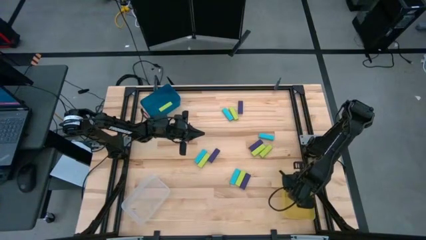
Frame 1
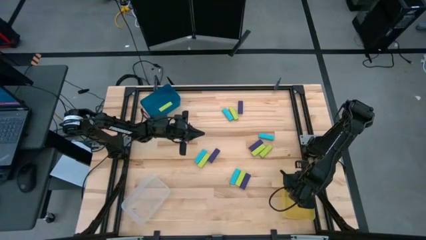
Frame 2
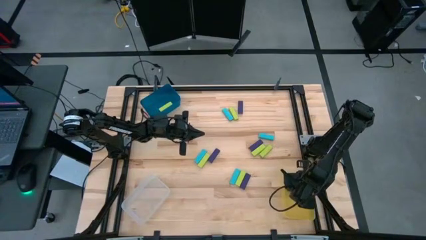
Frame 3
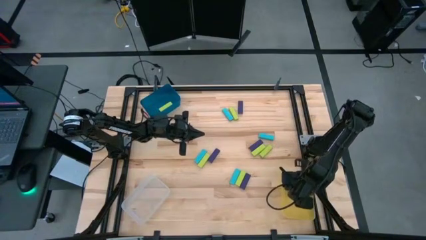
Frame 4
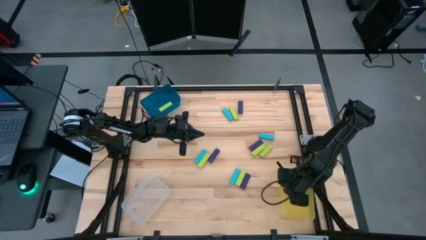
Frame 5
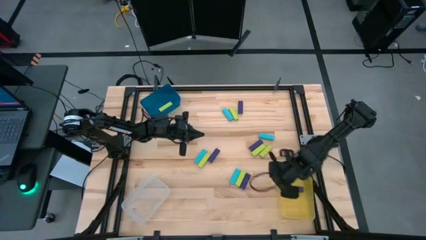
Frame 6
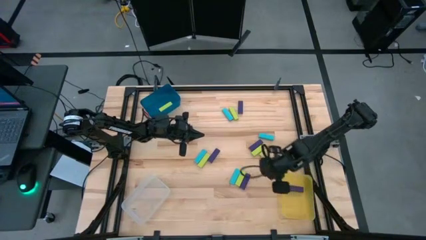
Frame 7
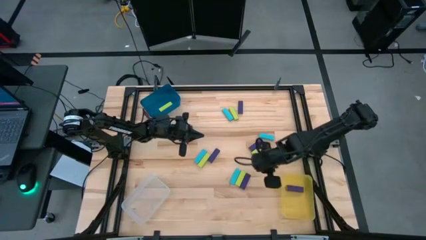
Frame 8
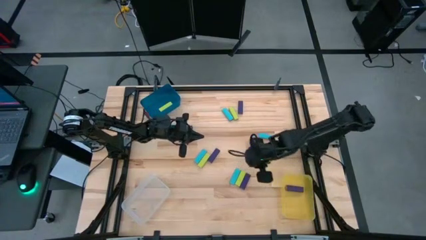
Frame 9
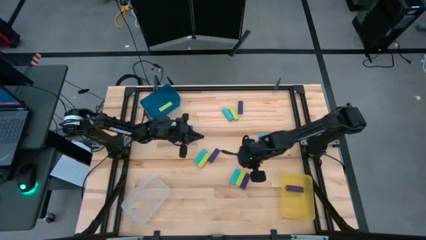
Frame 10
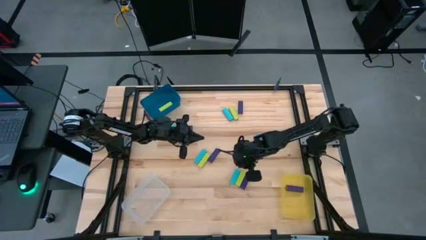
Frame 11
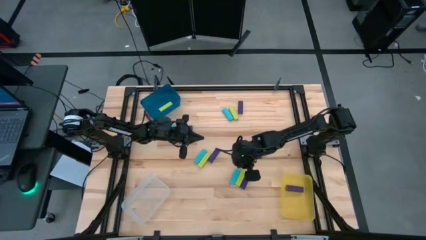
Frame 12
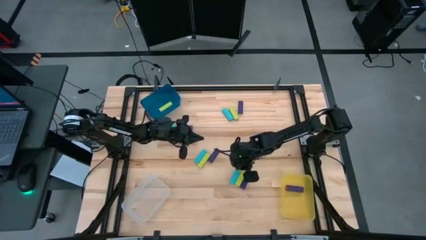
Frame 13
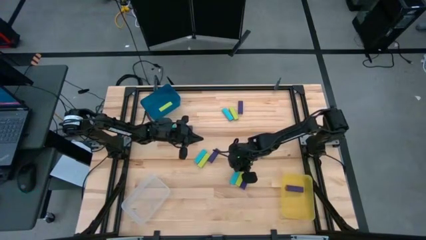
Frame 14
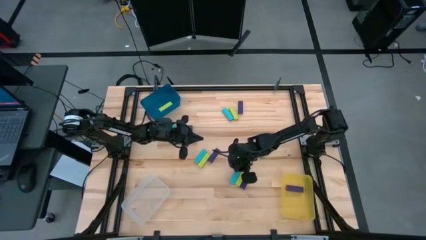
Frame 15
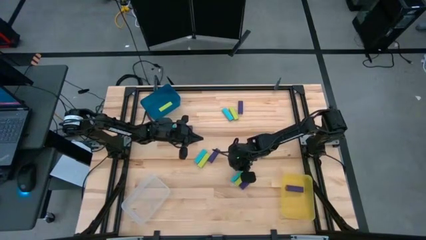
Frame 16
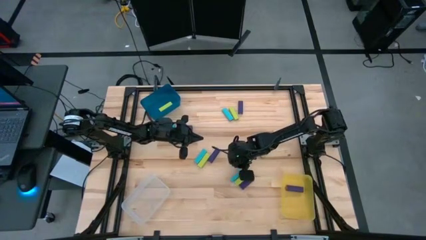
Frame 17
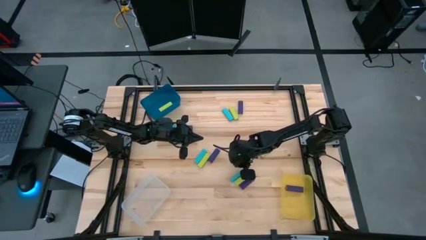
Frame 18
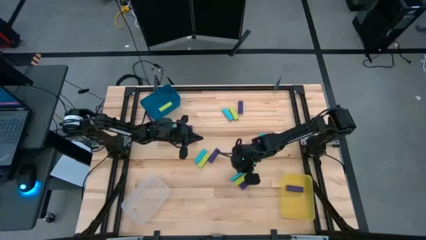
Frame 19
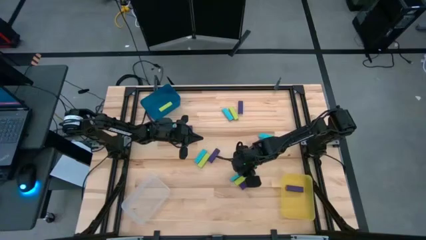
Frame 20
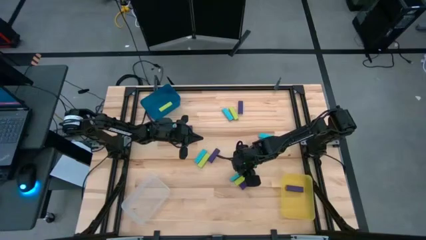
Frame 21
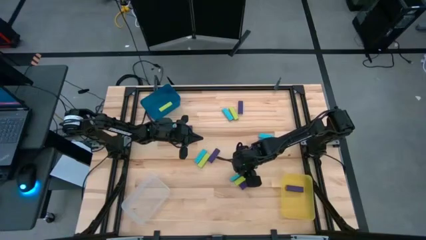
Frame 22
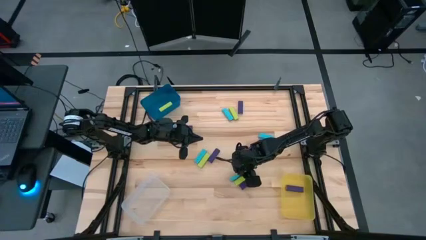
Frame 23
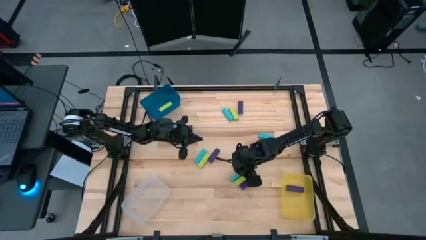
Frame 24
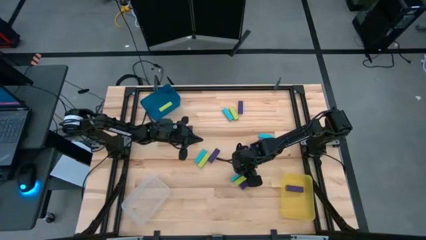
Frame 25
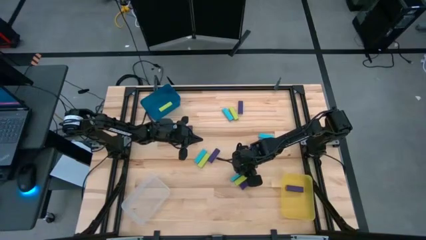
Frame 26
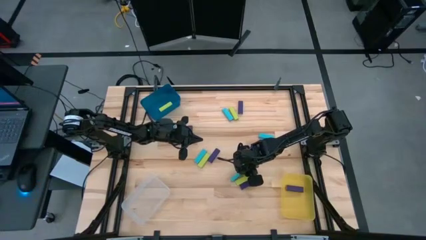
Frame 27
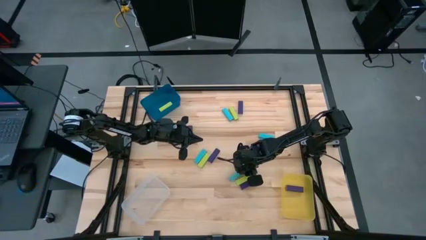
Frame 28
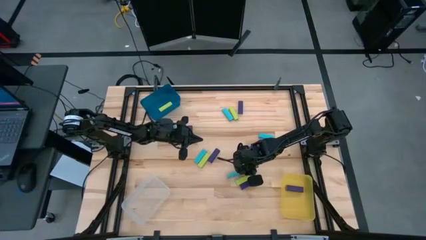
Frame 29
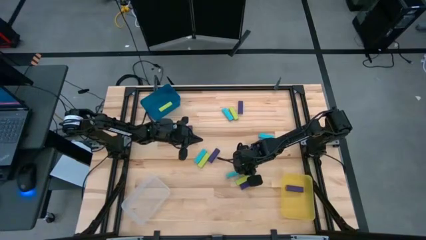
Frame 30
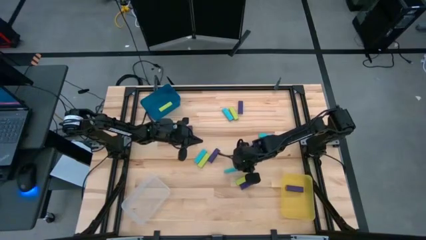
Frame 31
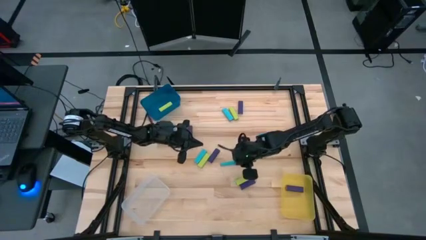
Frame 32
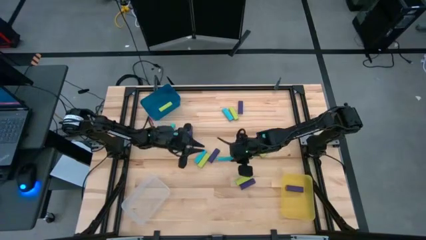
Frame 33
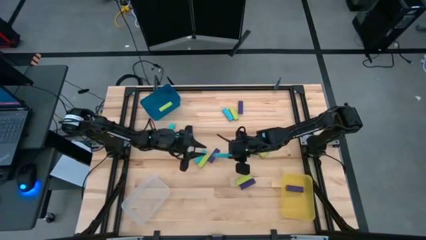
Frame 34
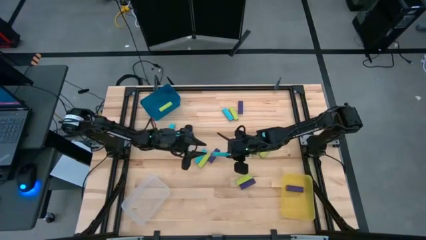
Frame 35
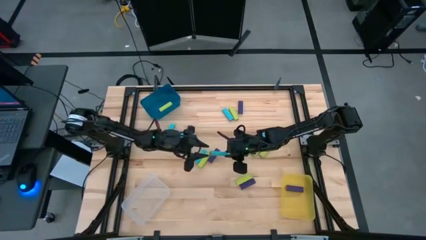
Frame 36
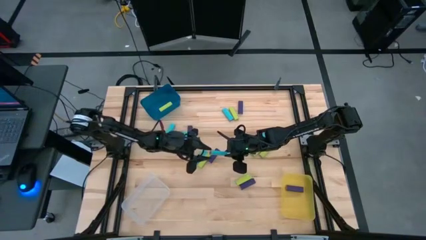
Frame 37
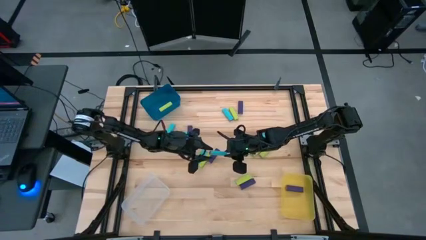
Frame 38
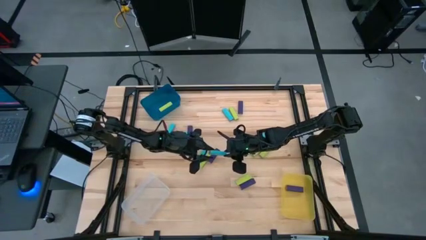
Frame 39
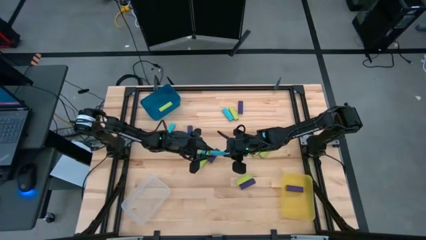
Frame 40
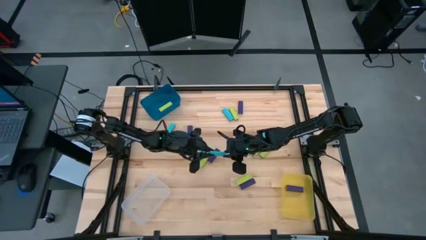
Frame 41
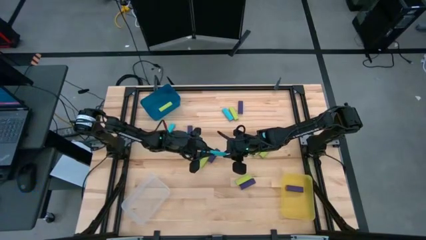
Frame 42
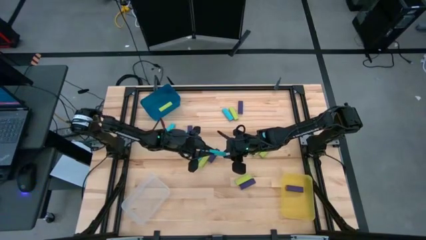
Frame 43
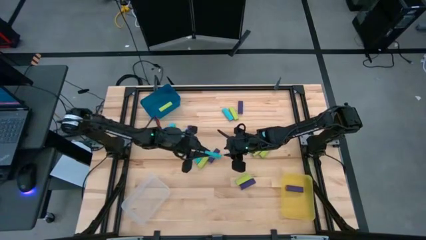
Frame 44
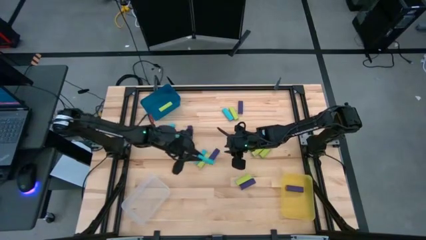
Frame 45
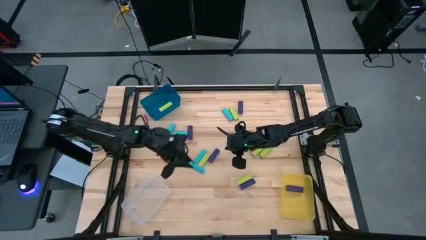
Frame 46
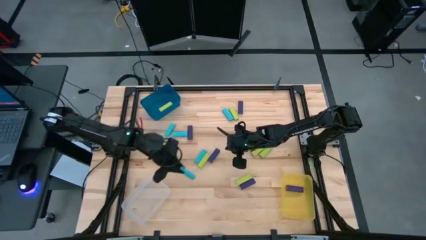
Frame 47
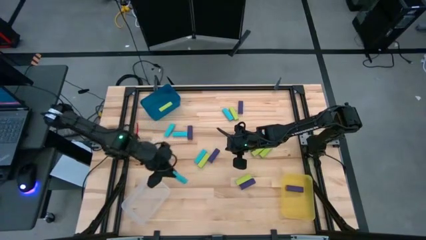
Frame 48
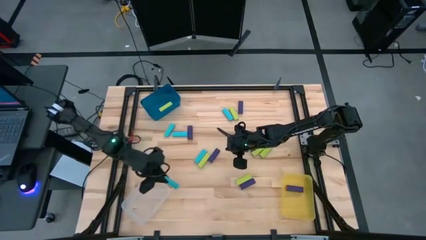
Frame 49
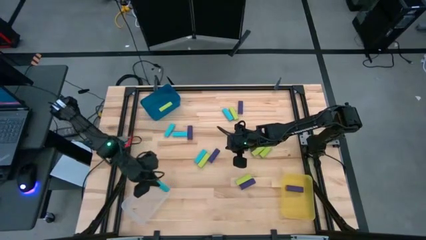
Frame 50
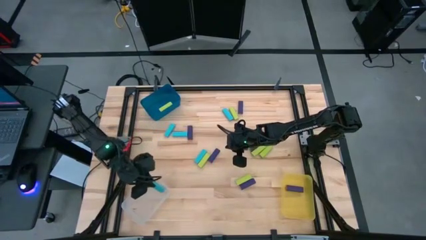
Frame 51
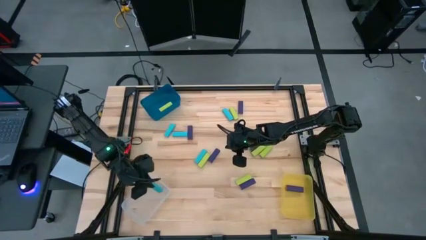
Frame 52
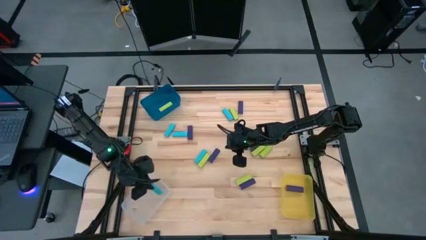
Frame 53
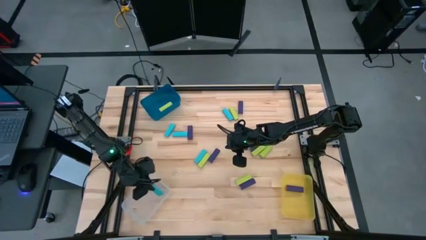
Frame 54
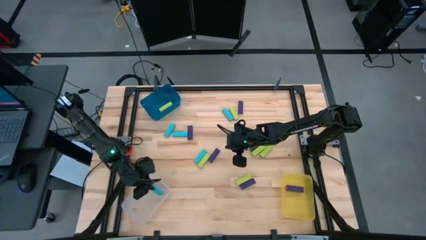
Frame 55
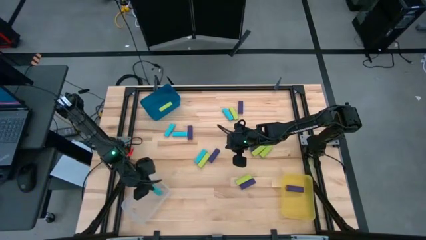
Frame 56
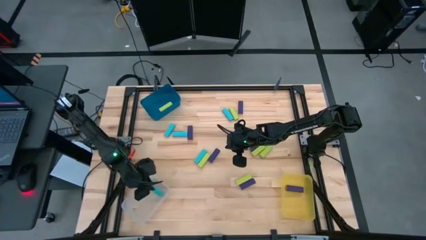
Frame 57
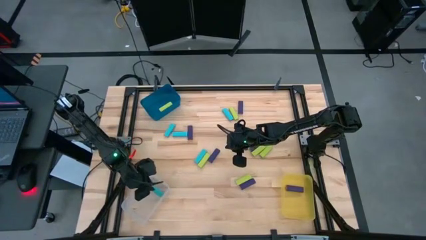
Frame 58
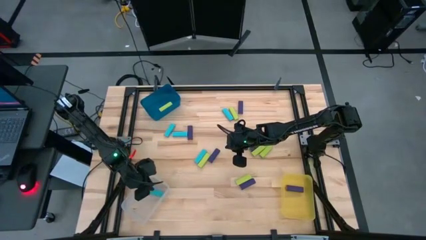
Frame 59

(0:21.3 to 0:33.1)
Task: Sort blocks
Put the blue block into the transparent bin

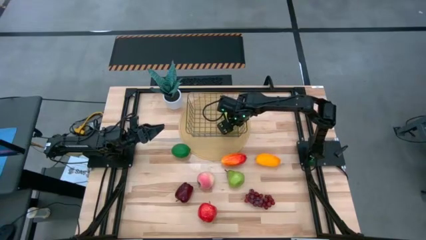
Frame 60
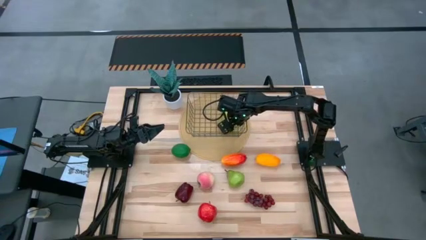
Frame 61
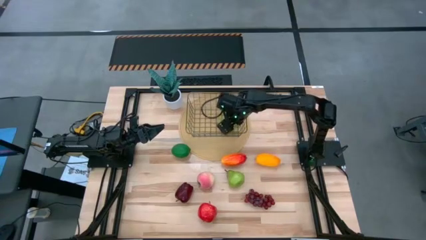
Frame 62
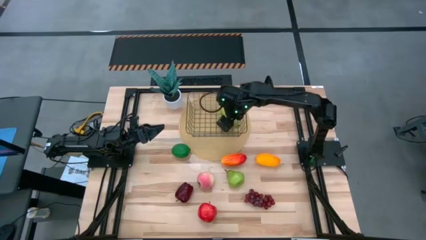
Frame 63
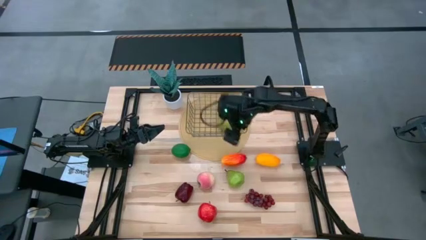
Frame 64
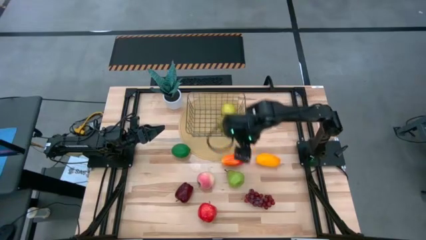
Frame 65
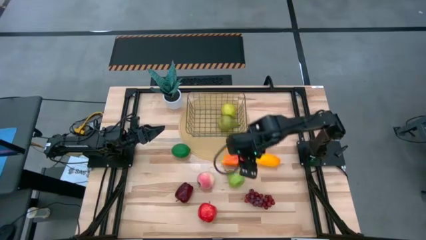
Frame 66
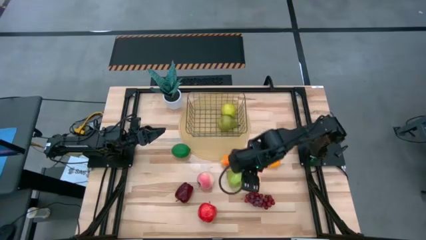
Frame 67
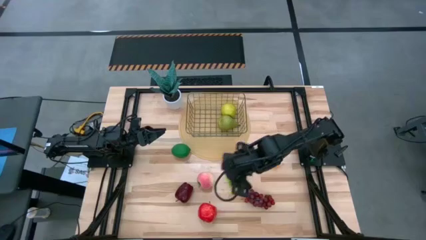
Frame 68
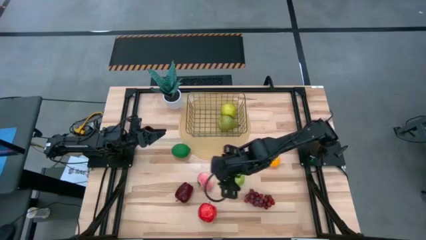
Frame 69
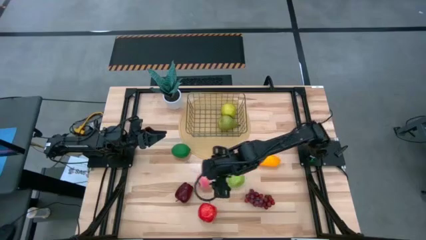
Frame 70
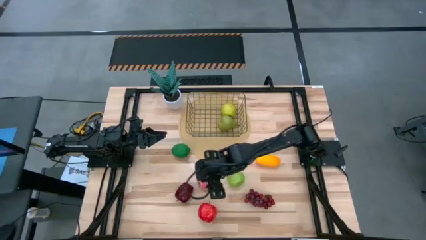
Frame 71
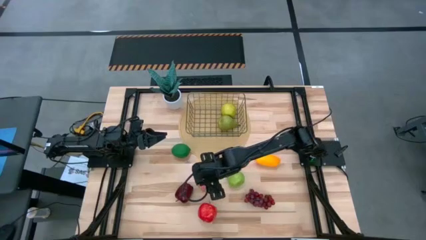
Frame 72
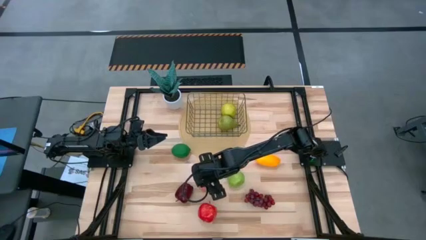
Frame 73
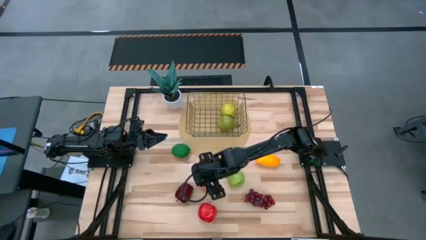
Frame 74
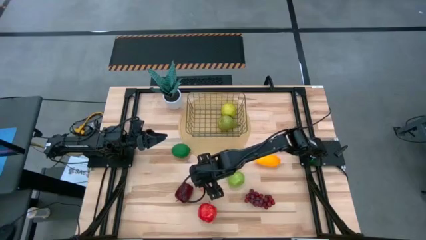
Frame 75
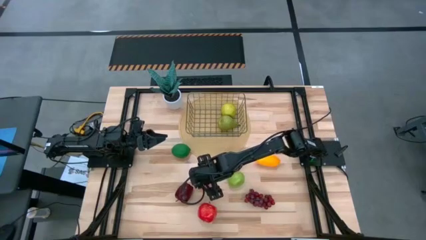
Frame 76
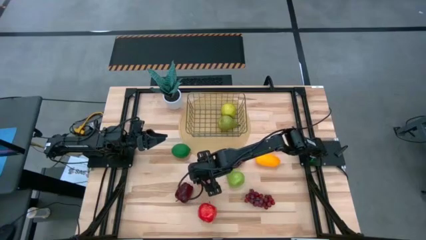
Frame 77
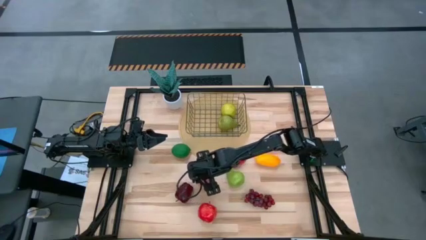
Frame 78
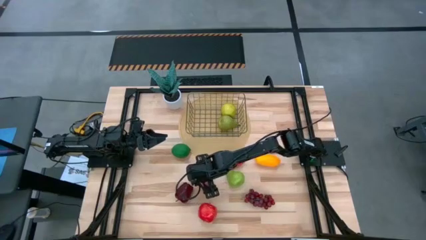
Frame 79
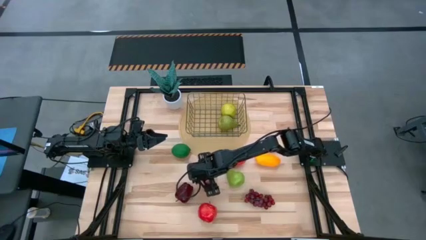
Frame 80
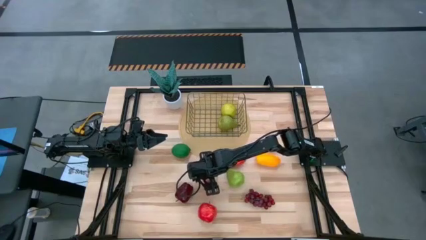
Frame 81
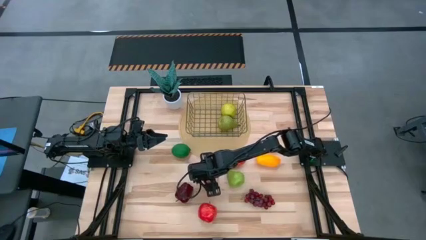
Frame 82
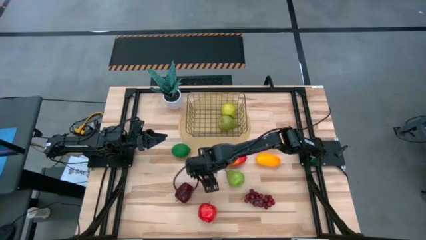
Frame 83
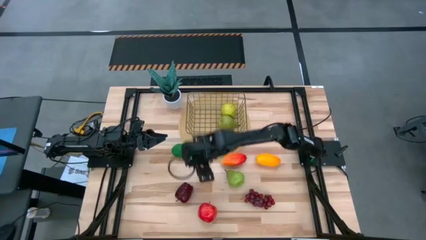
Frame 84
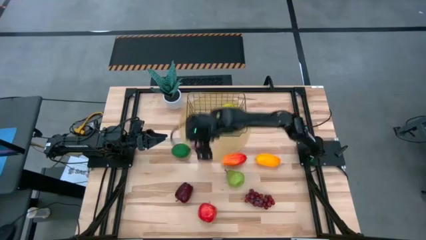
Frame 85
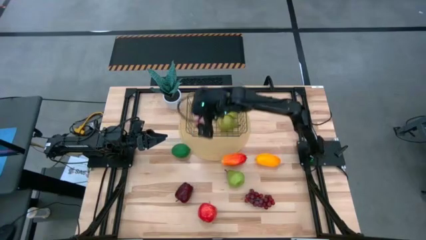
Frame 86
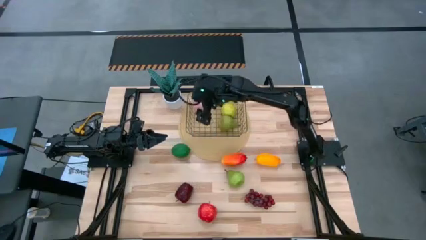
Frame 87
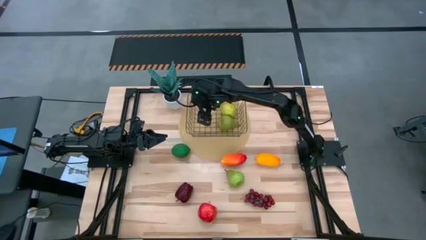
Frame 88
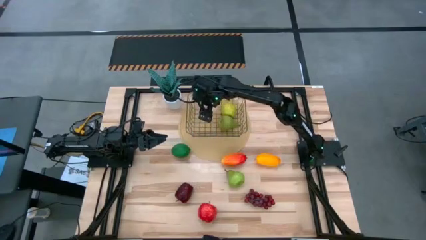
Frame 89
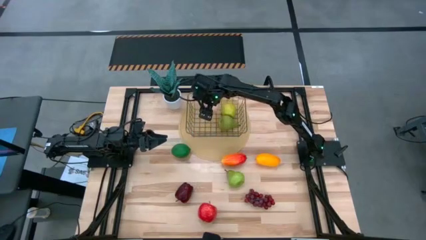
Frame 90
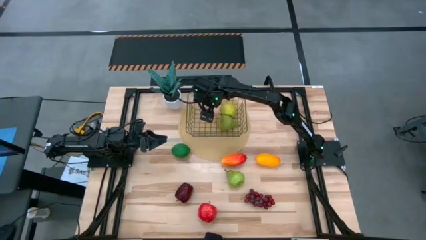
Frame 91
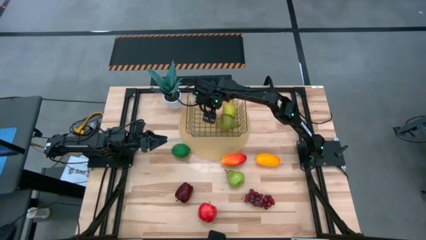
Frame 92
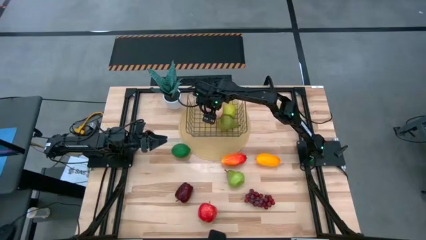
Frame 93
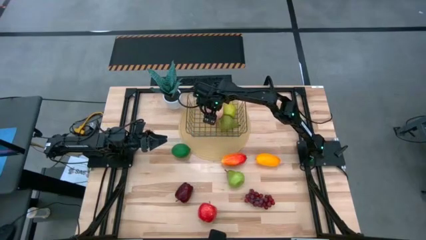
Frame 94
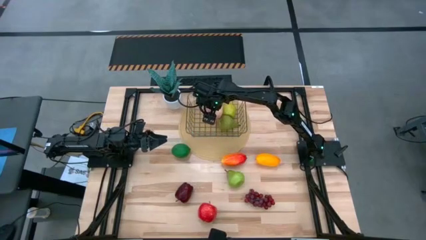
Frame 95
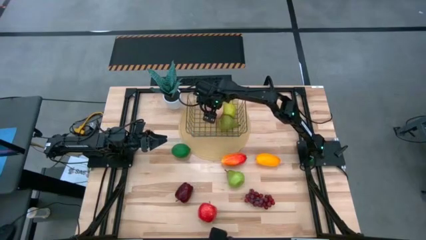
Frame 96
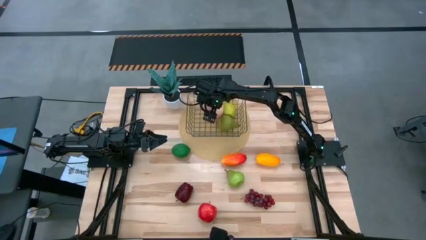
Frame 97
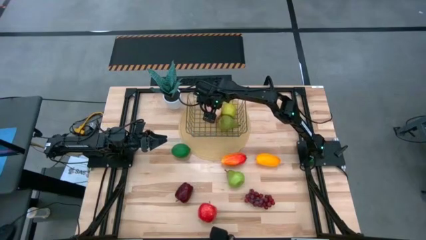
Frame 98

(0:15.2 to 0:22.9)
Task: Build produce basket
Put the pink peach into the wire basket
